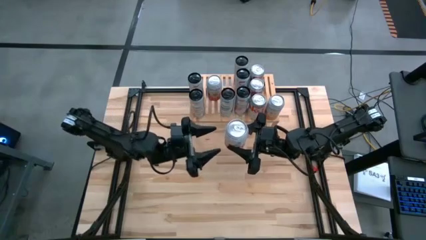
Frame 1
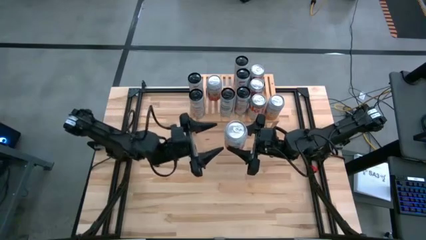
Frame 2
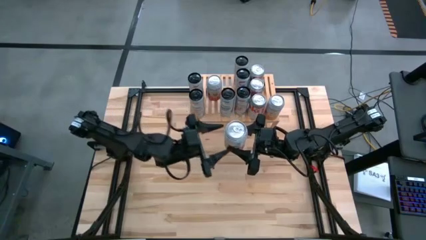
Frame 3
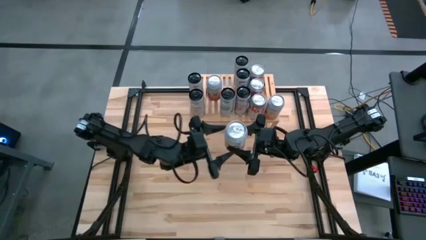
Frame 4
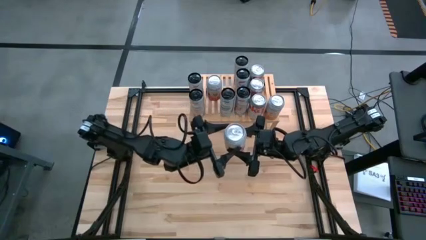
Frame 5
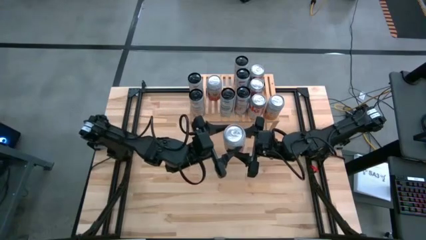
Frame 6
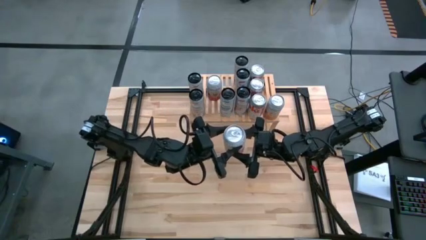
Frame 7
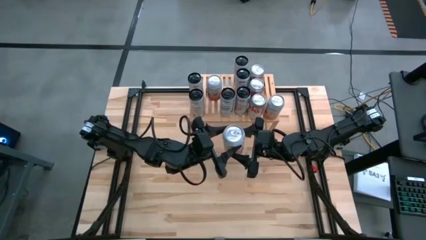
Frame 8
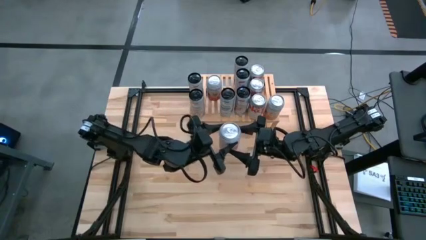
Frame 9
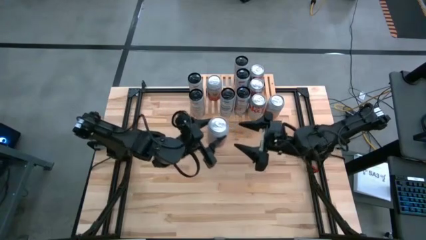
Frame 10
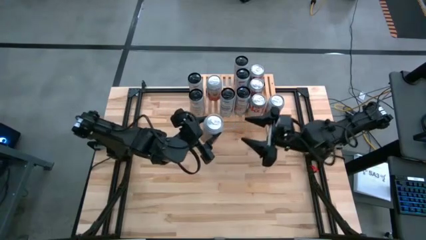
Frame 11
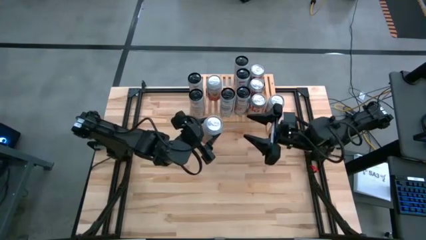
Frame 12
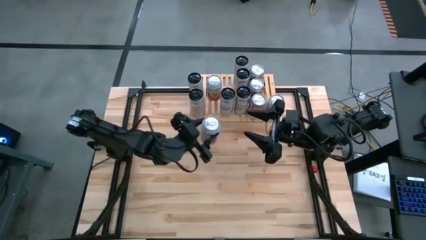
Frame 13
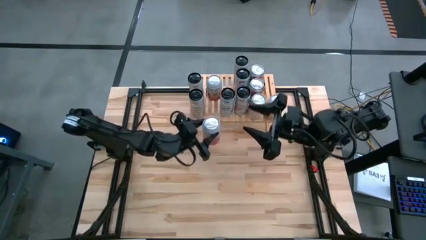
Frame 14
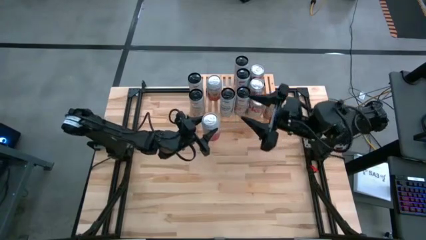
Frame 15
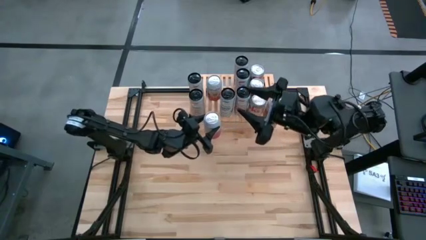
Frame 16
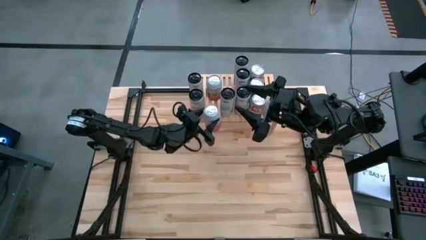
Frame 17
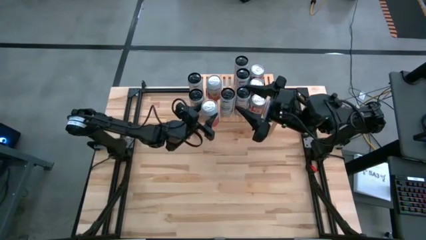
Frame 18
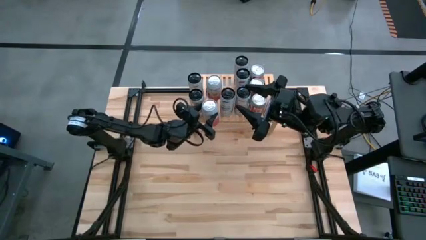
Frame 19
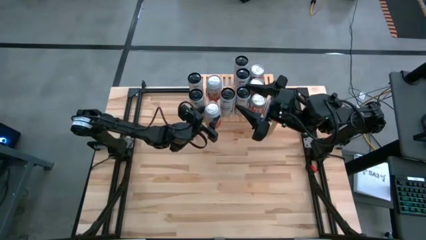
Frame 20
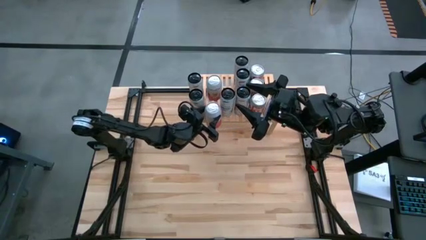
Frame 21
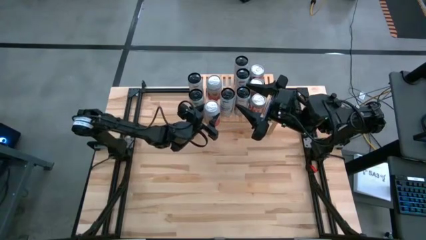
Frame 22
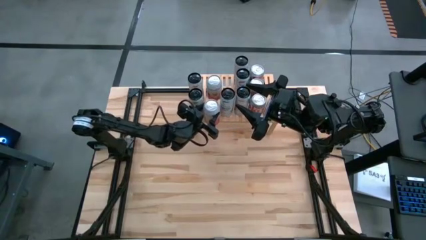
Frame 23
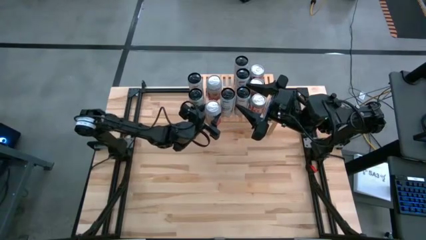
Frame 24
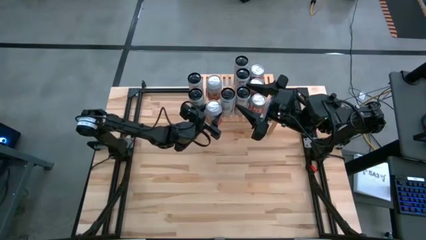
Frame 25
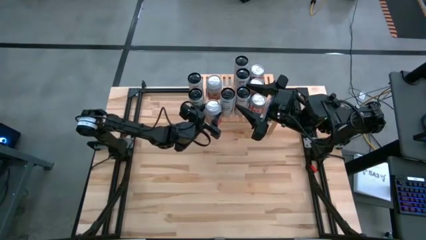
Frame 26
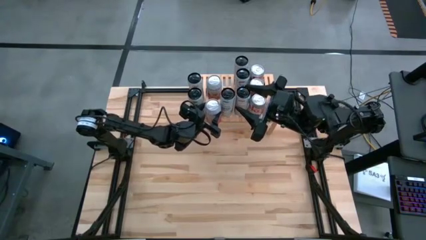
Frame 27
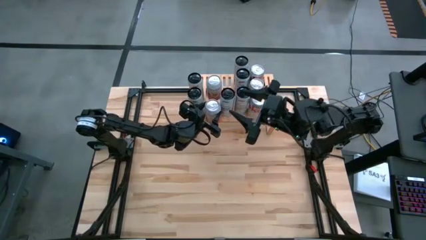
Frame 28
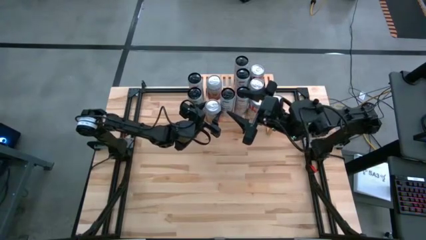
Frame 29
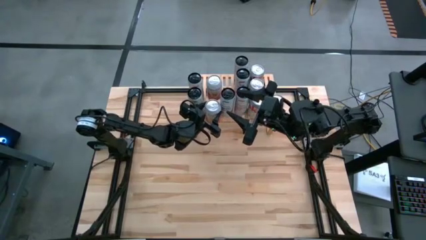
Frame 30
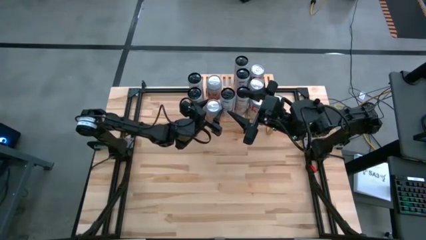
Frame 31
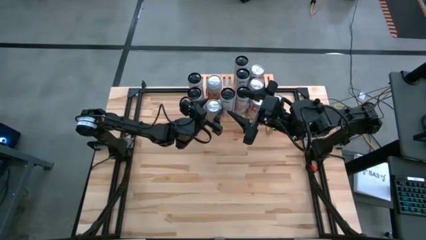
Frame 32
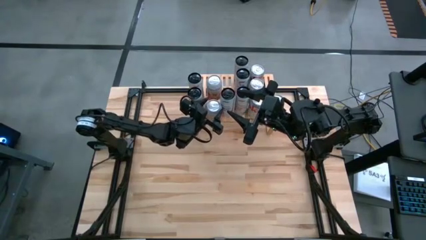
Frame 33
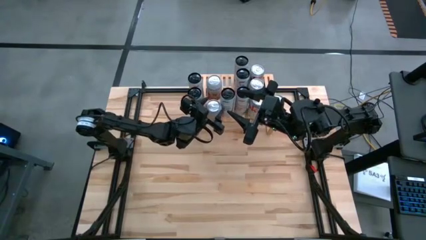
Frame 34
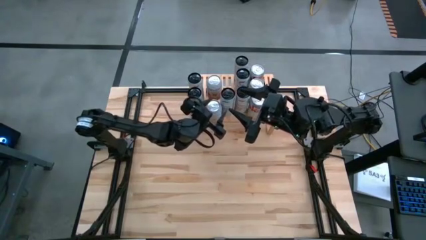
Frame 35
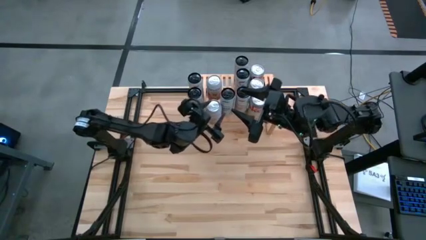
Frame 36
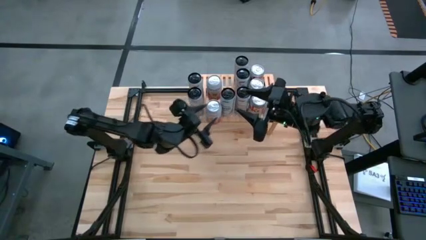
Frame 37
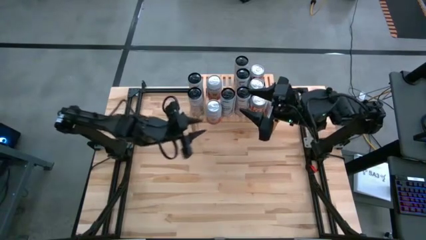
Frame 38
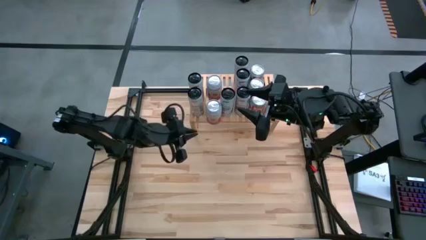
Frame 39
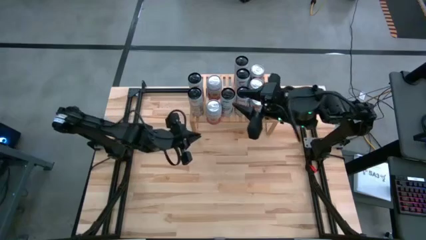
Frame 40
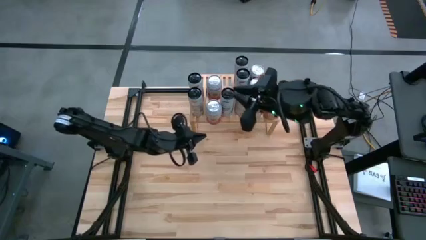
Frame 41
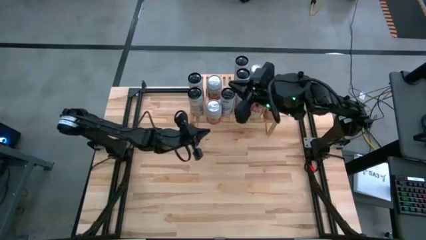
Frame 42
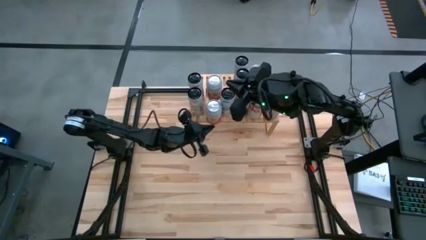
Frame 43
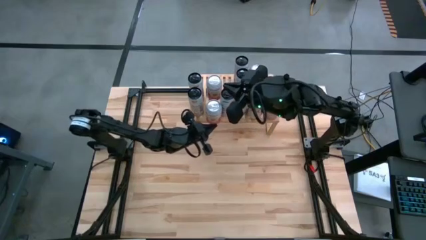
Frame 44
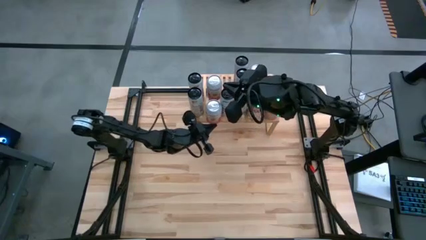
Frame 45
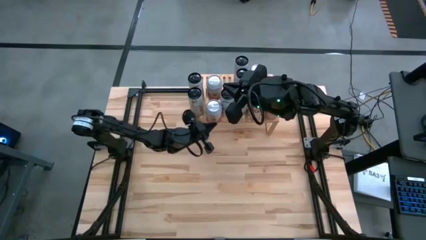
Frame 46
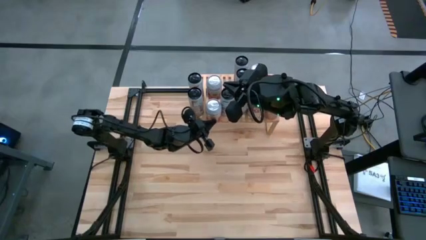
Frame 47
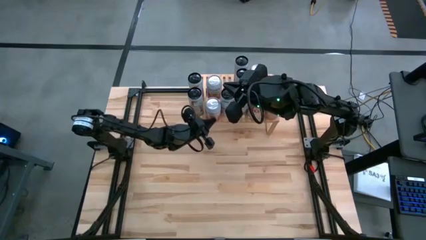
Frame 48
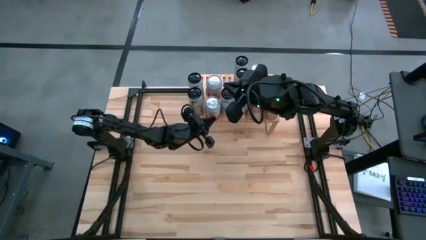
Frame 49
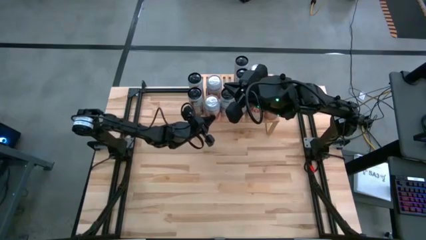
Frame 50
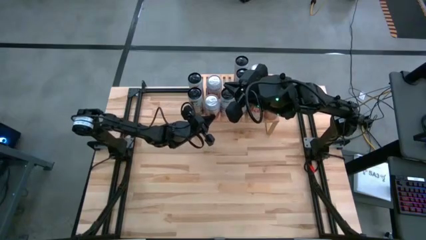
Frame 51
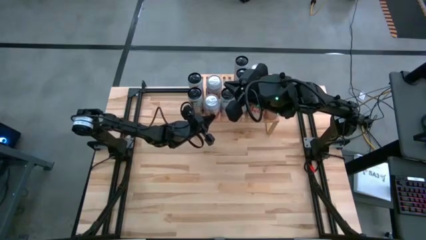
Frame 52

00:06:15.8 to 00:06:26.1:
Task: Place canned beverage on shelf
Put the pink and white soda can on the shelf aligned with the other pink and white soda cans

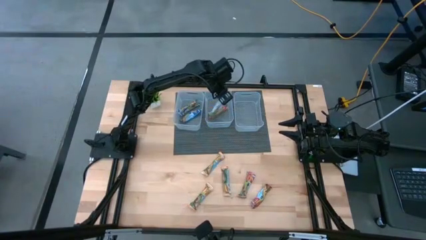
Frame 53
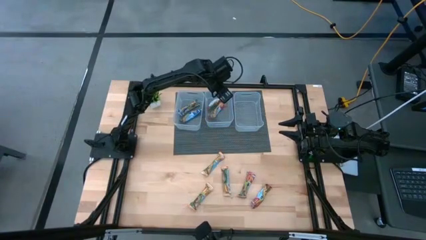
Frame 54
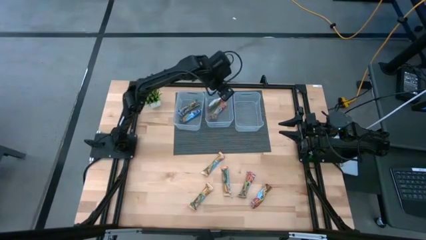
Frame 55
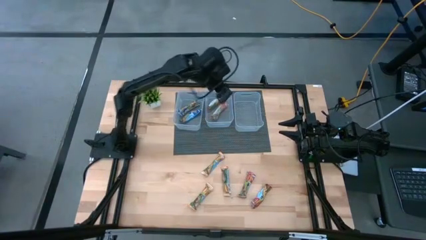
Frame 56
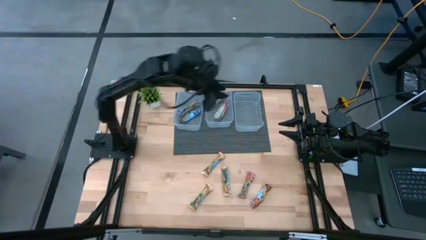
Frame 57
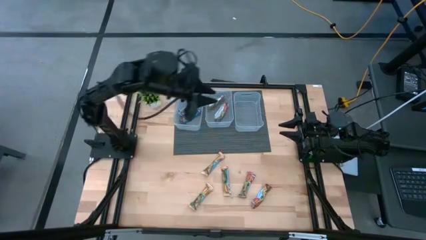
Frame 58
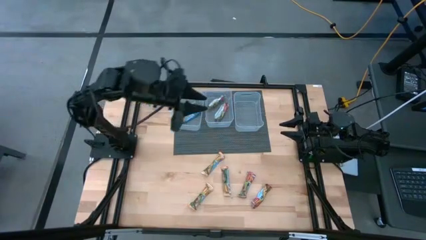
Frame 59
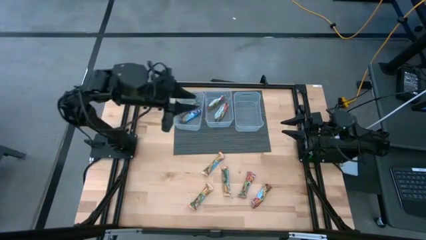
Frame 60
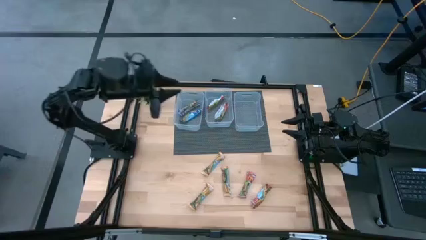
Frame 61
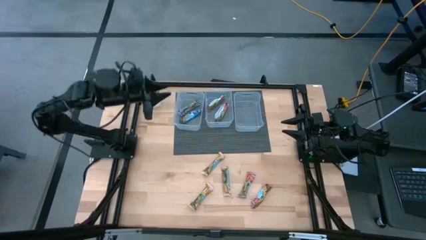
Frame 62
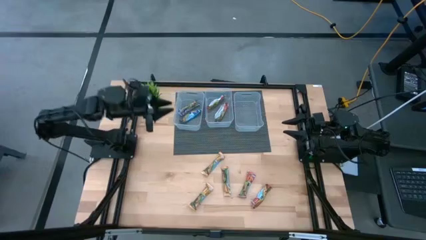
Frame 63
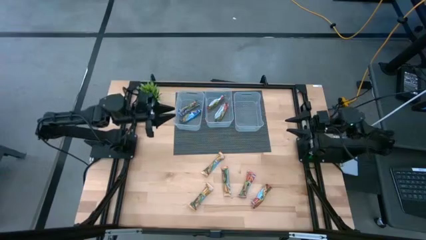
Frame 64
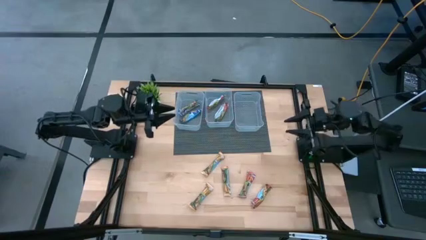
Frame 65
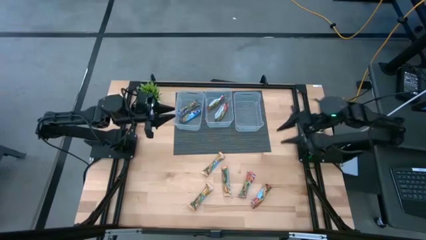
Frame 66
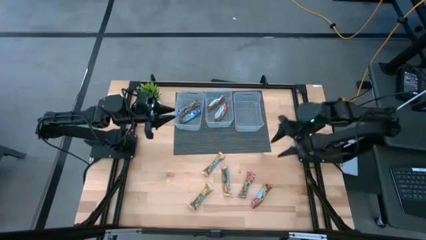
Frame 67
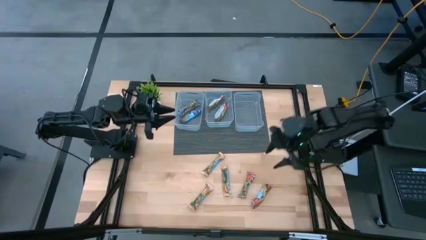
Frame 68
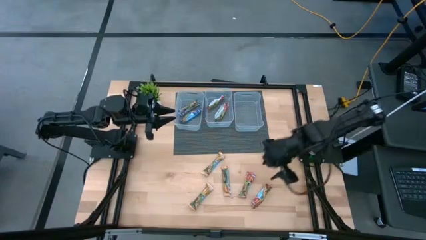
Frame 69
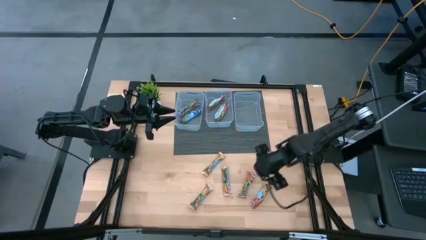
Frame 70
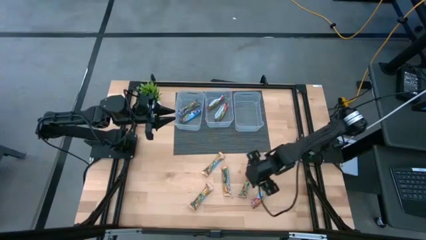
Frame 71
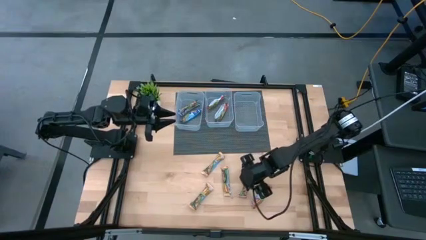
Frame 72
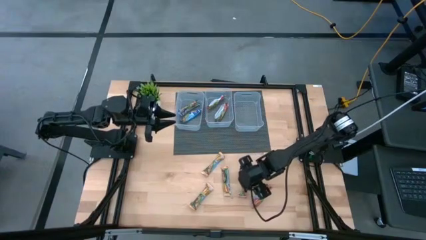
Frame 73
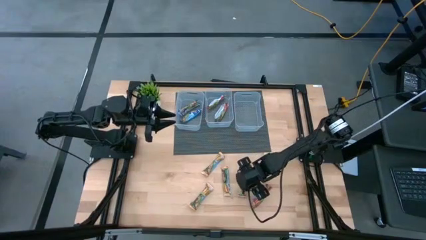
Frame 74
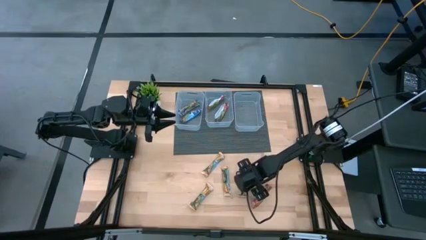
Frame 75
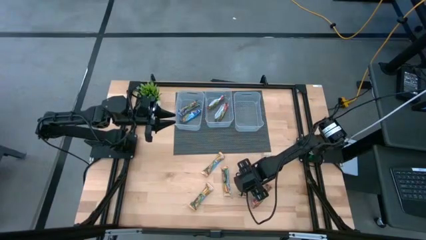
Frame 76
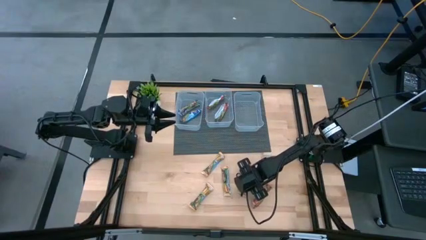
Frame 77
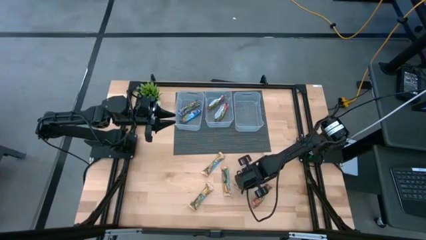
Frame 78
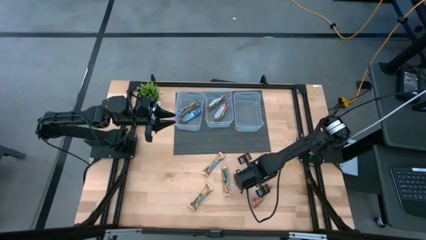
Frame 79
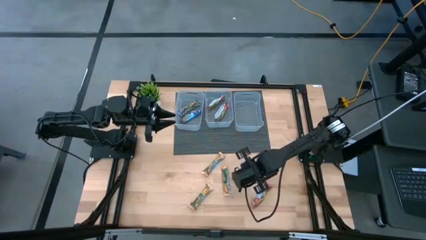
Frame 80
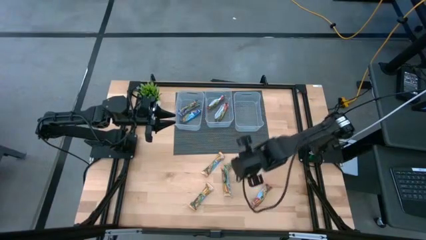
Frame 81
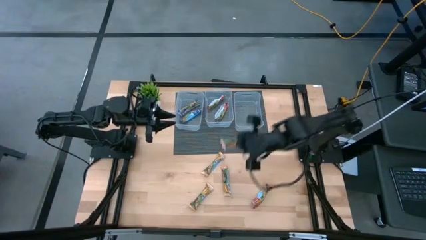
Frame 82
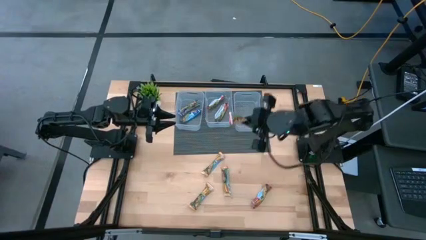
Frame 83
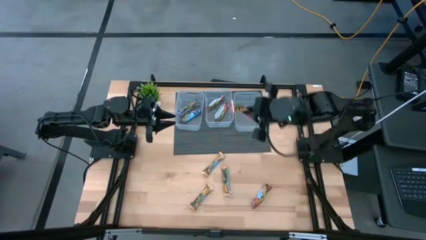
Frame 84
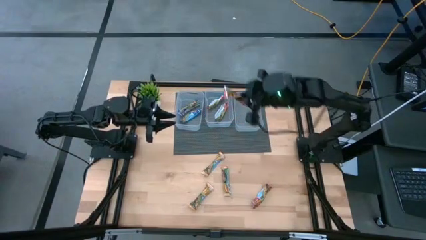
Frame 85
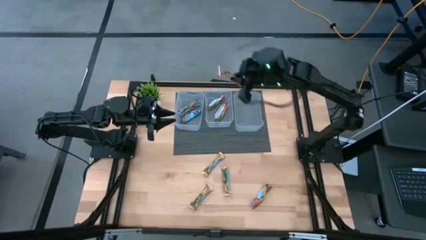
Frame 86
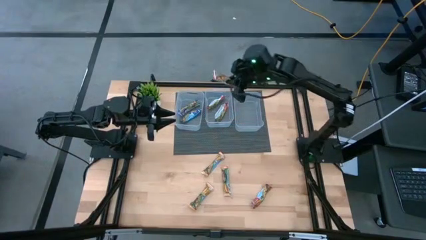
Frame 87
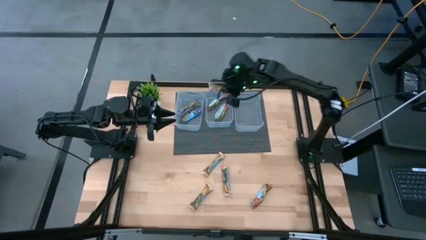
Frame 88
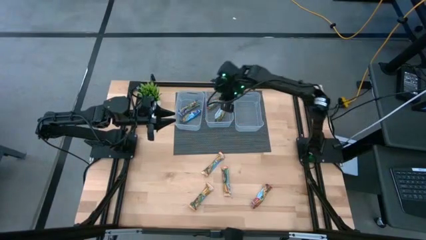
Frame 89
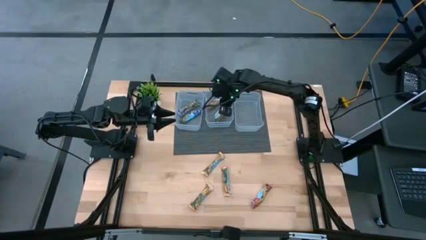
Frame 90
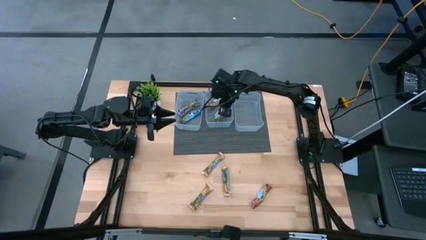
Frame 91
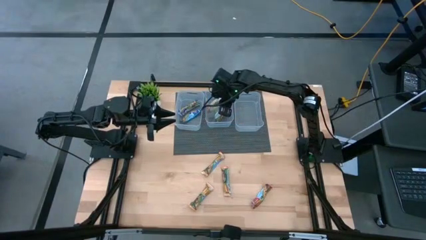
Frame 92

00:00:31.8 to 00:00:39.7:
Task: Pick and place Granola Bars by type
Put the red granola bar into the middle transparent bin
